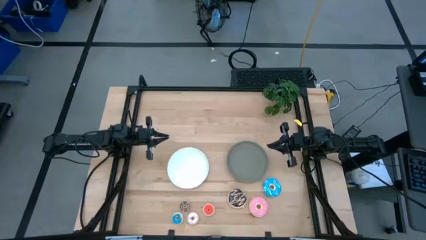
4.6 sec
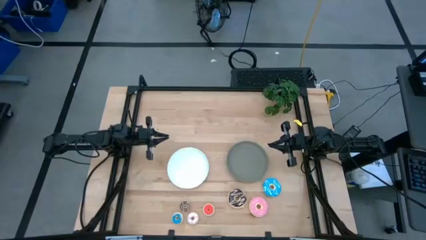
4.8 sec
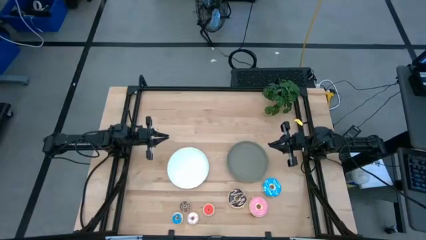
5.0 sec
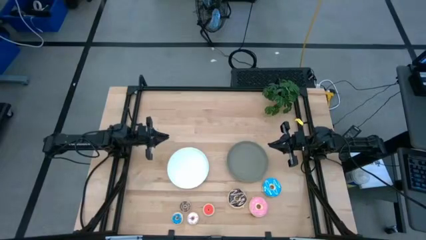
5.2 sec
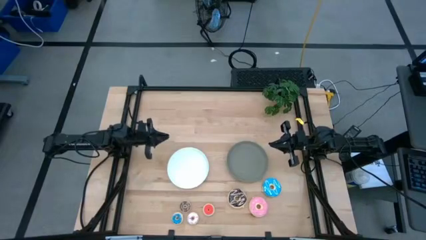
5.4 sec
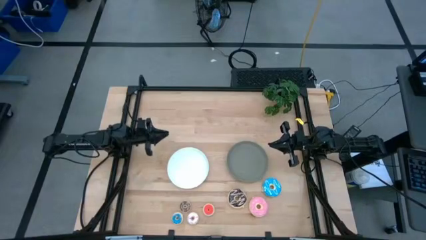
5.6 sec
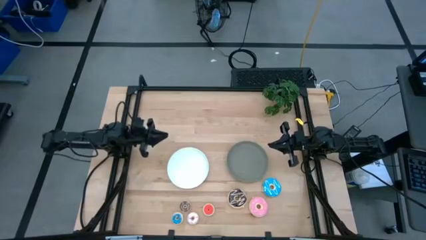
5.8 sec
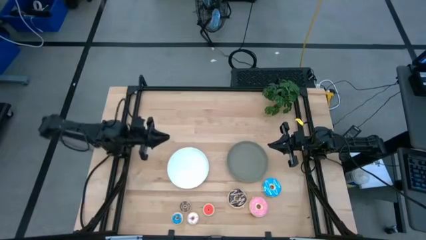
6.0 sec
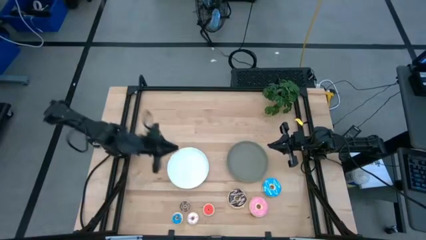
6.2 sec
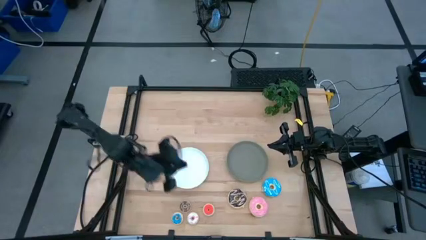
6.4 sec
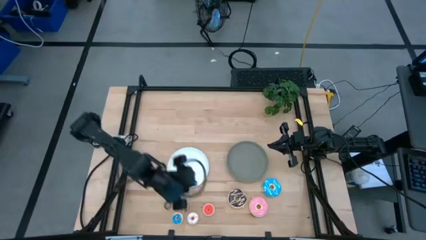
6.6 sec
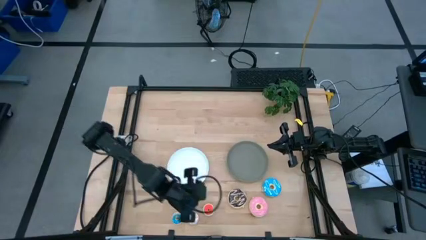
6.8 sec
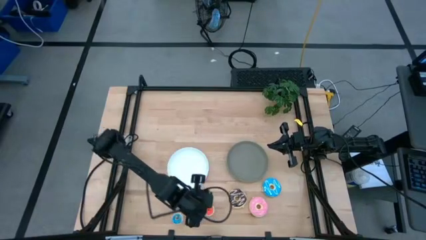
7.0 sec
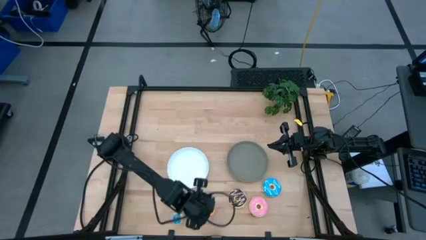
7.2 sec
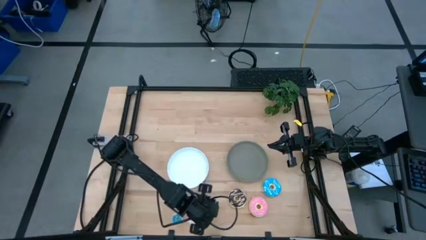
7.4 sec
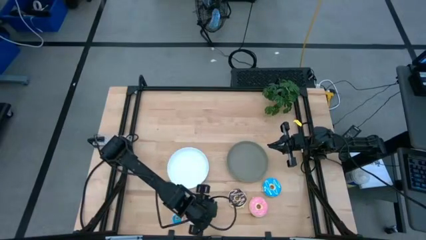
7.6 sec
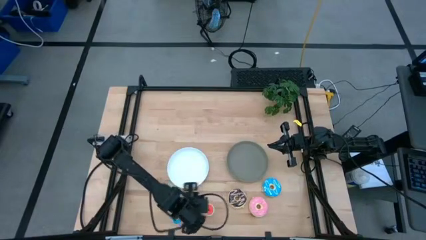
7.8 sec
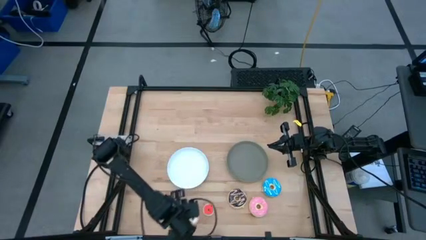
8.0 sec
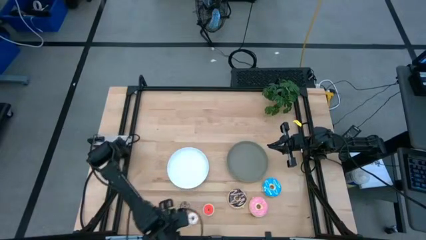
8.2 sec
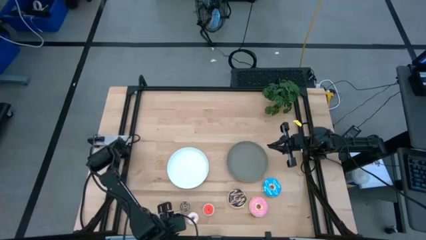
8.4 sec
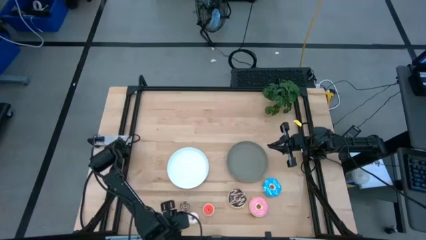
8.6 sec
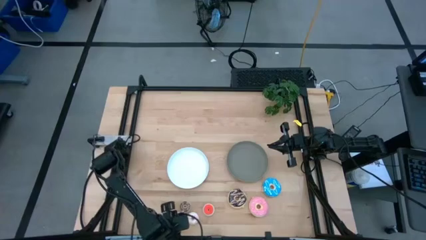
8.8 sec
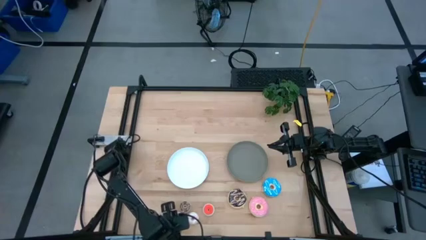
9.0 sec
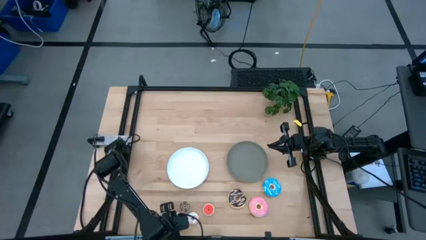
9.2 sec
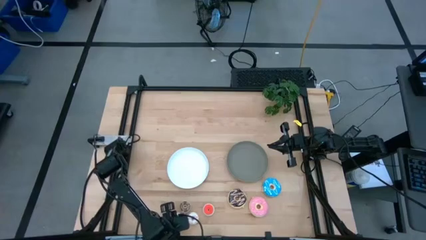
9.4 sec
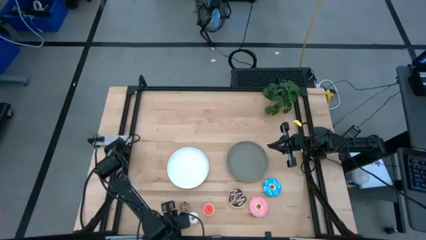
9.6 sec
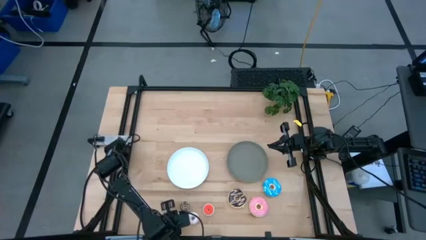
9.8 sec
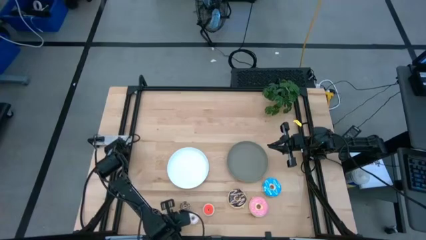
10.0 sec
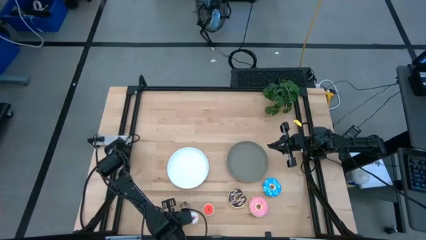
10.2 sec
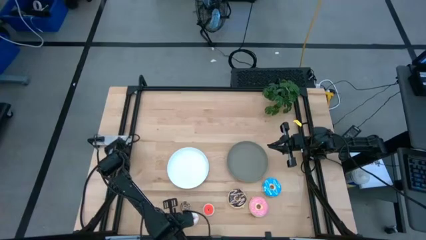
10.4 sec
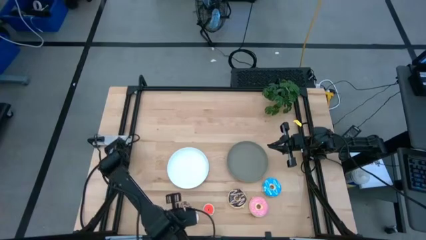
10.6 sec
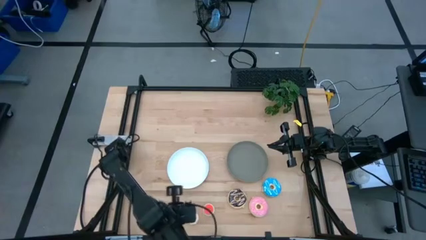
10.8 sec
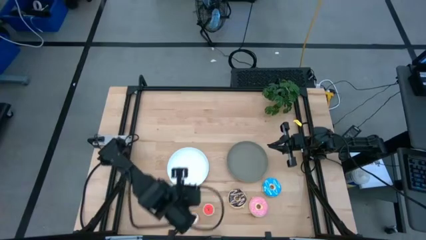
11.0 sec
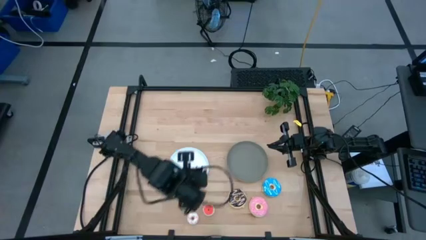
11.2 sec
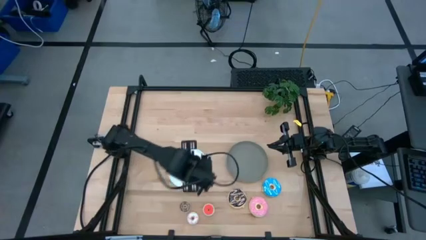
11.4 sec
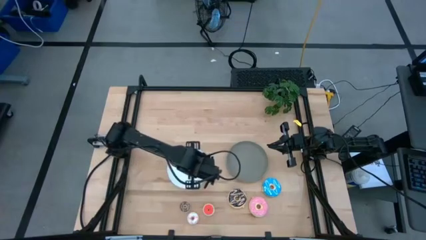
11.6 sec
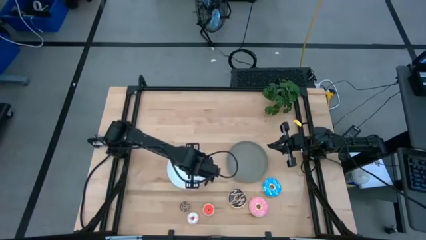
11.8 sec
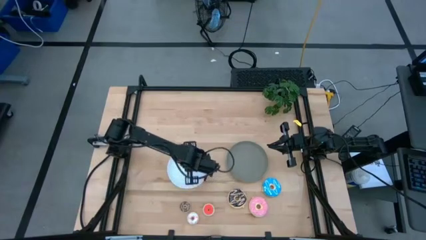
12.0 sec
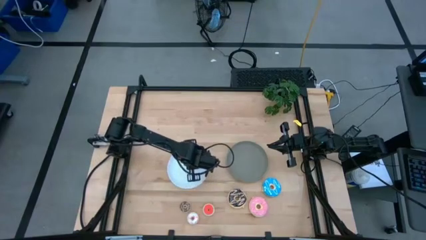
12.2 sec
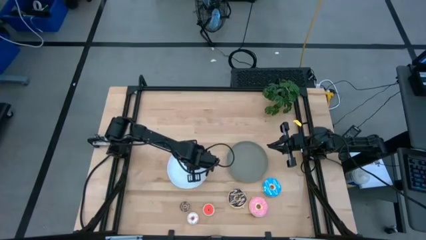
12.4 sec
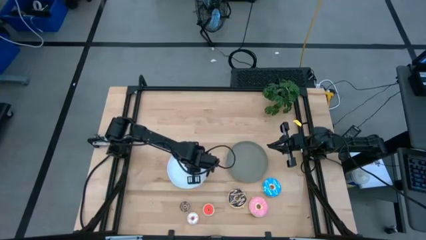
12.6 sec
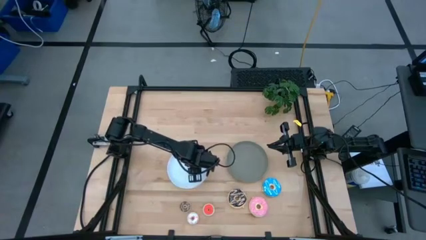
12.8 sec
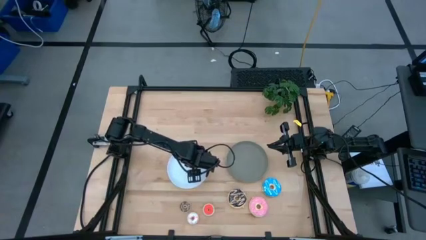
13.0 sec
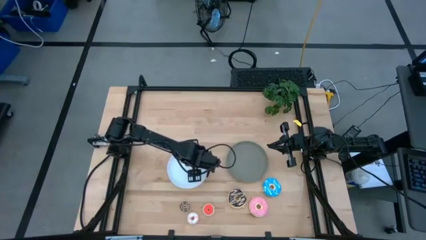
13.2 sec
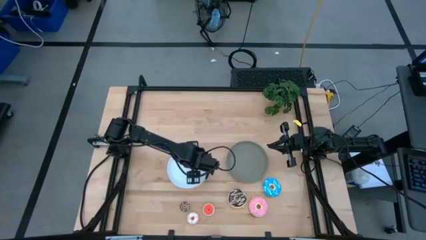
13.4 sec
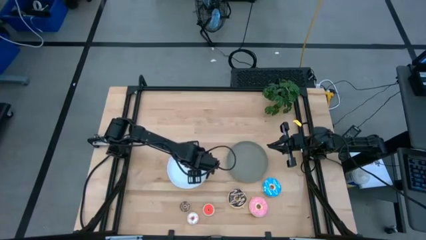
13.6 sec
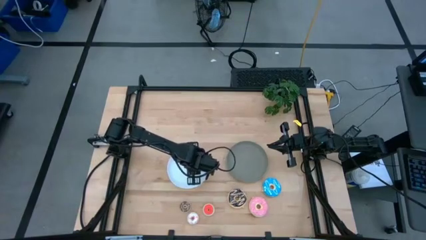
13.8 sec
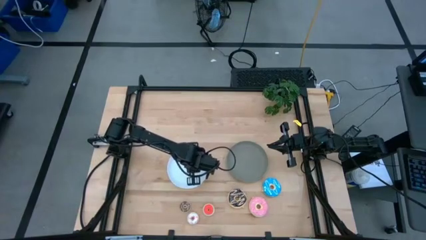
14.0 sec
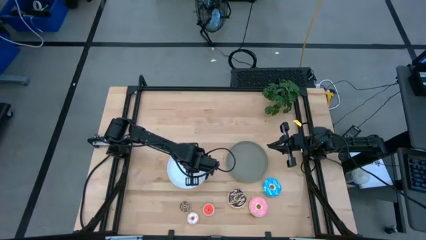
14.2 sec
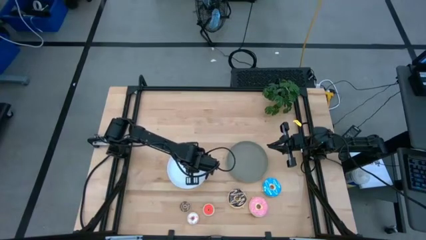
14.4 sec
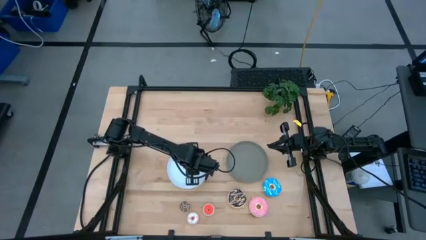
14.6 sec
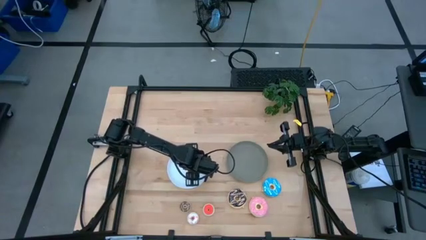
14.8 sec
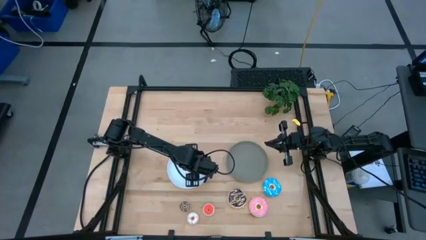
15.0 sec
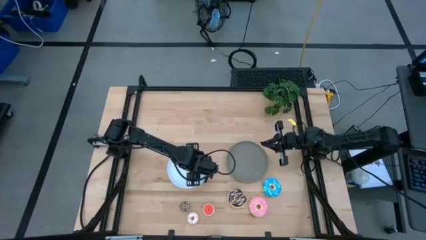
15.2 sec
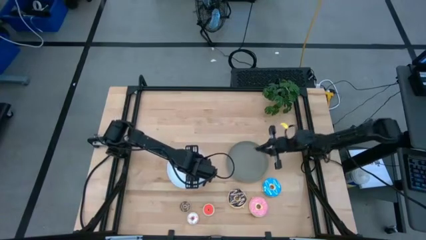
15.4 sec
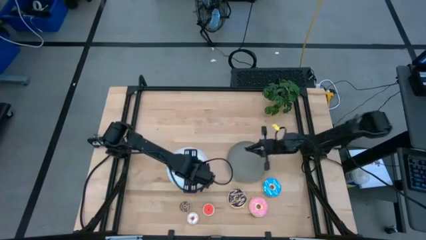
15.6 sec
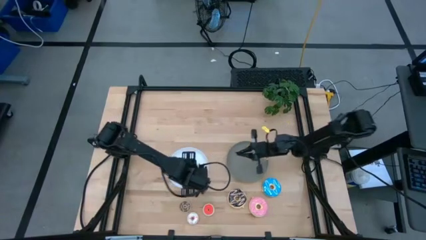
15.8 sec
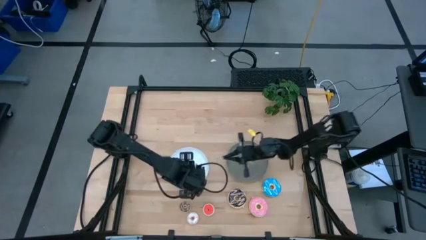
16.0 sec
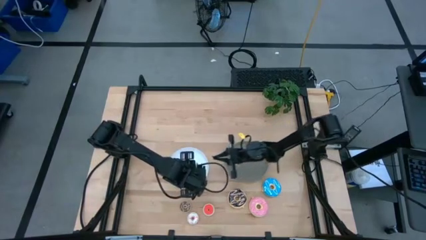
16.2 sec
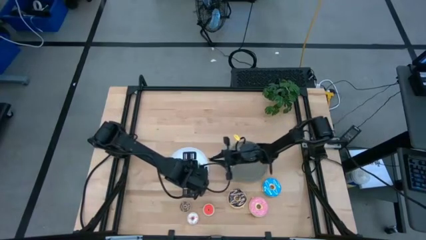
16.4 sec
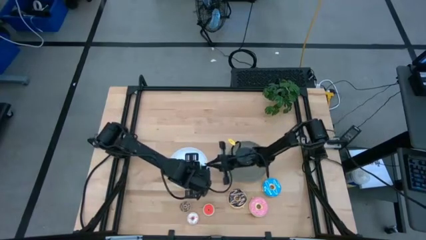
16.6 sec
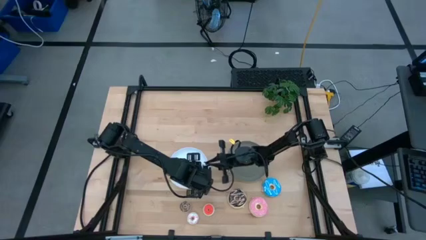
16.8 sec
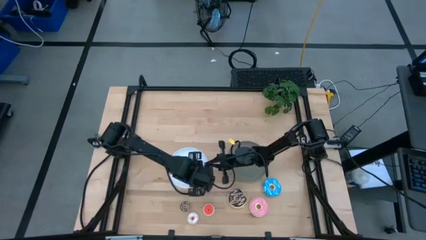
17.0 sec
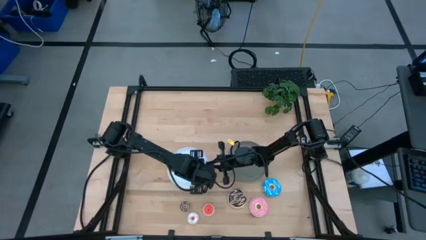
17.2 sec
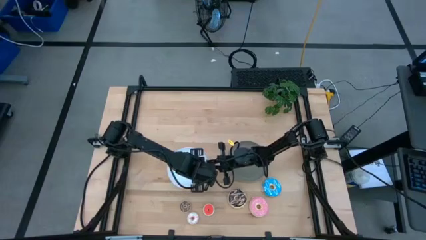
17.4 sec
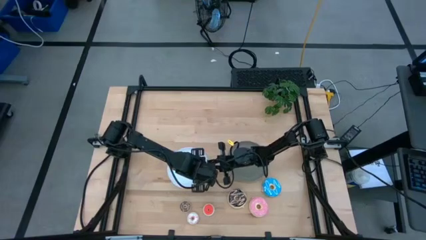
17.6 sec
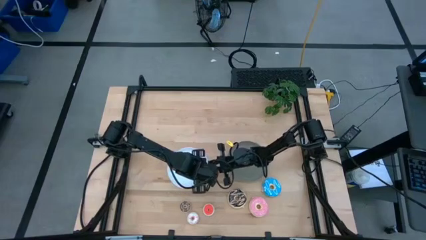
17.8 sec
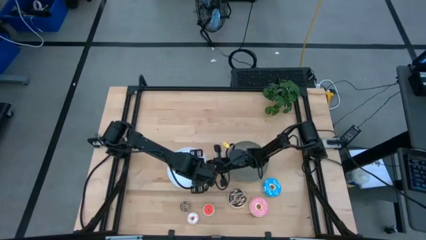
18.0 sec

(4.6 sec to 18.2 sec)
Task: Pick & Place donuts
Put the small blue donut on the white plate

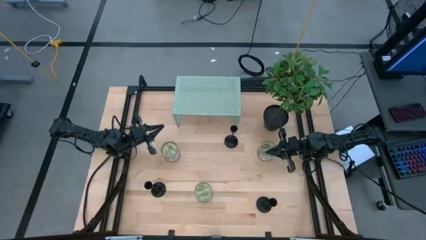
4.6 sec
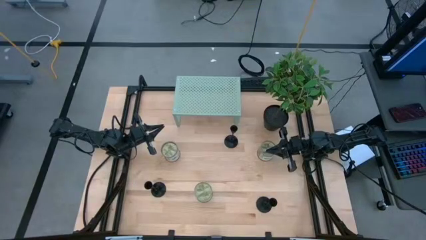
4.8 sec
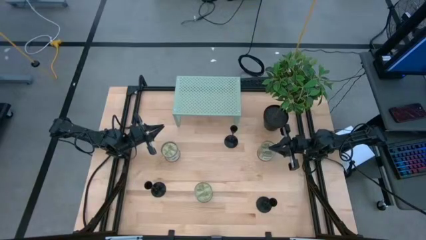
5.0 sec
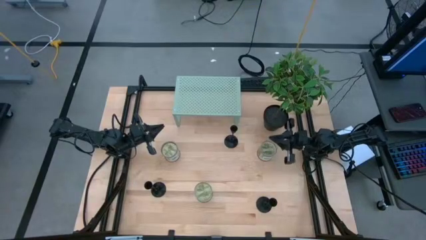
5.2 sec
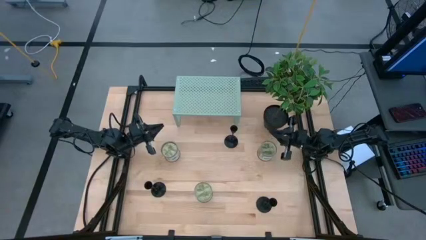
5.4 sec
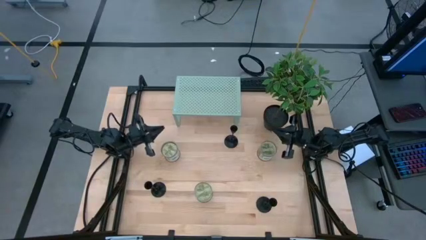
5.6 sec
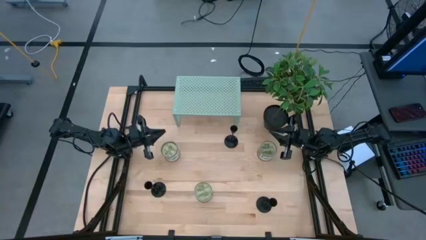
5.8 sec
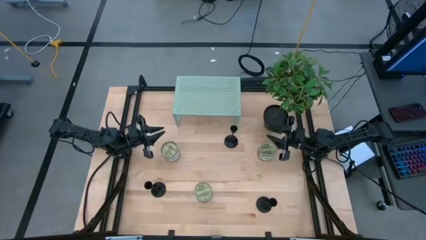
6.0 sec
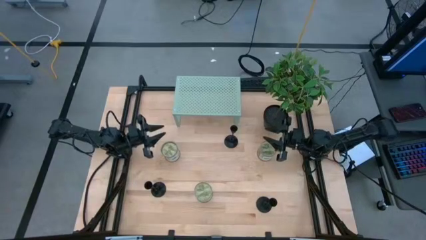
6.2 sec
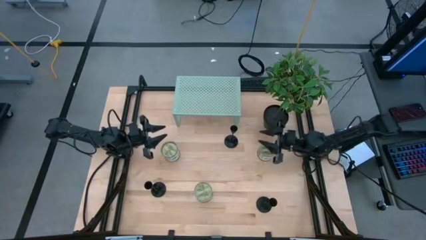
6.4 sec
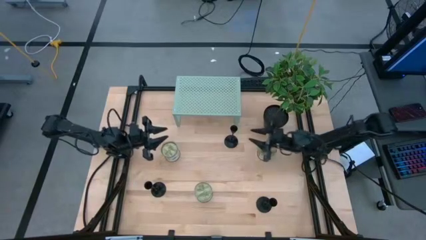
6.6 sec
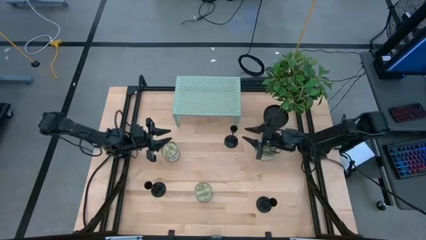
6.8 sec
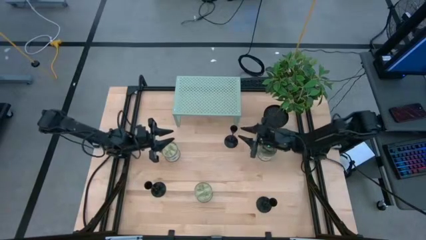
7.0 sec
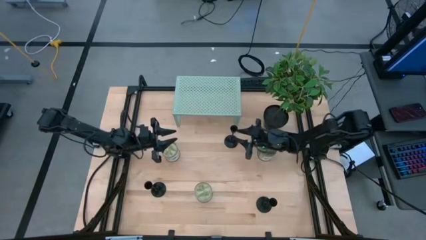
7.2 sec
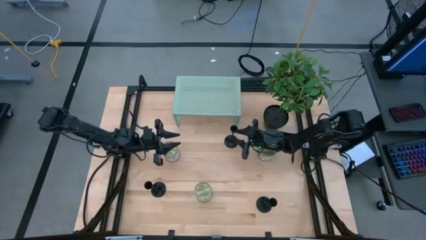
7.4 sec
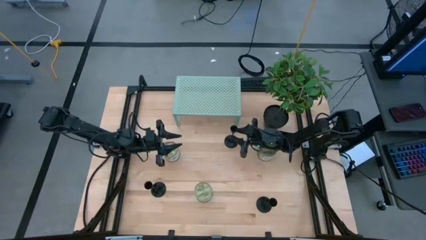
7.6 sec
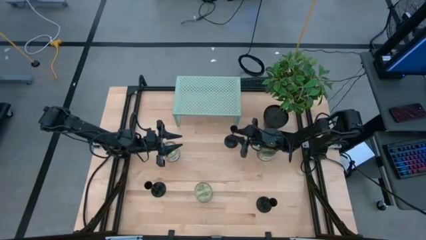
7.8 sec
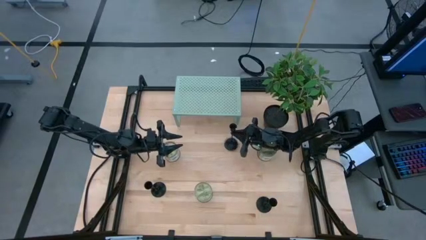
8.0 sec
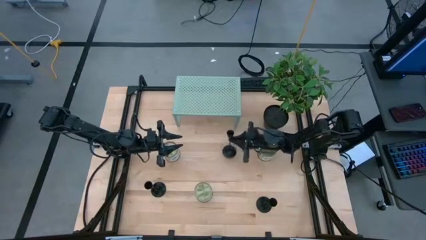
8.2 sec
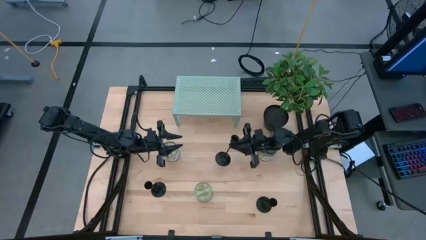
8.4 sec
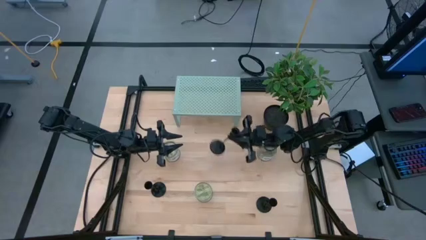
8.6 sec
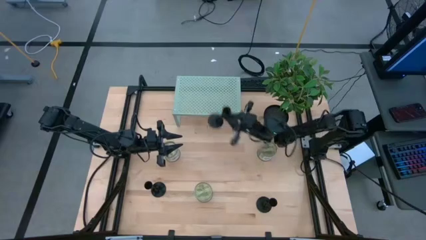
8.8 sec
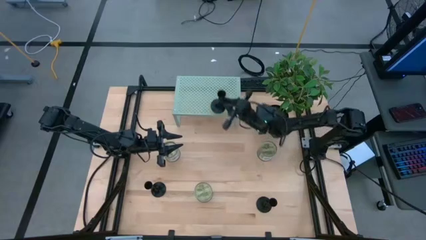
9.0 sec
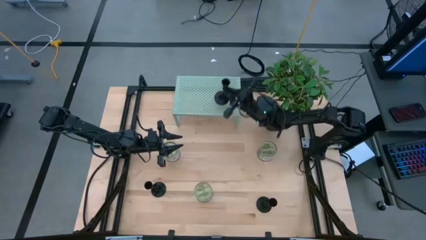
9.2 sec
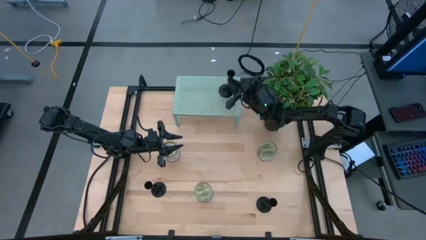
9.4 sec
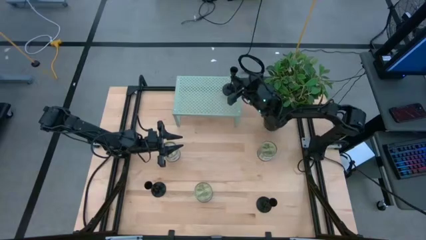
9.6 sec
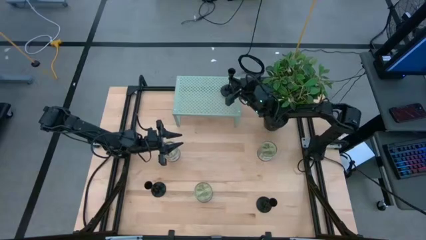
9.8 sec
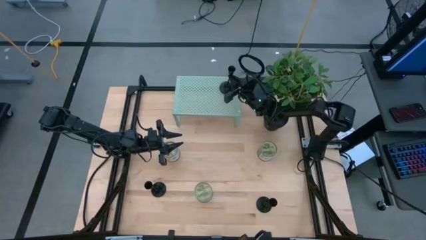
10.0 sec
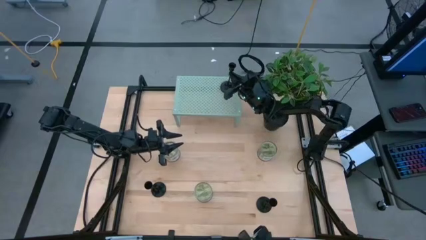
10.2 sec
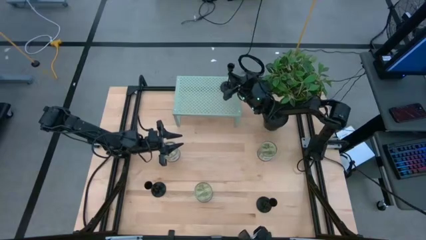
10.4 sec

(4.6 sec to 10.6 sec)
Task: Pick & Place candle stick holders
Put the top right candle holder on the shelf
